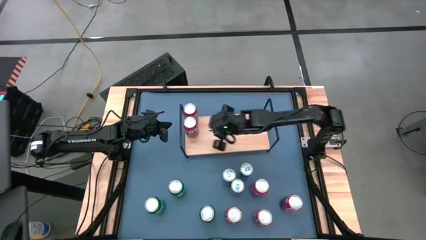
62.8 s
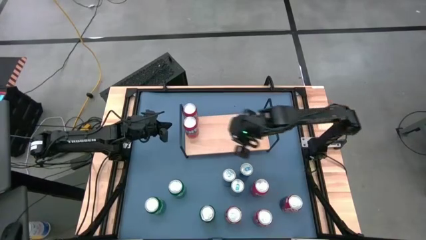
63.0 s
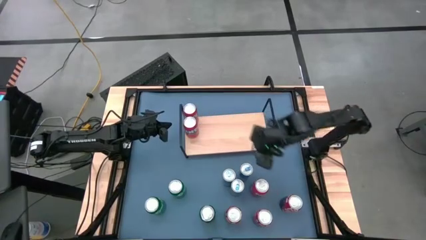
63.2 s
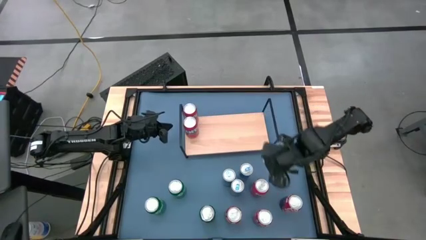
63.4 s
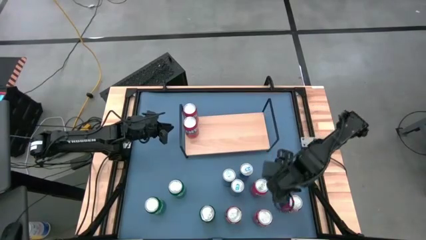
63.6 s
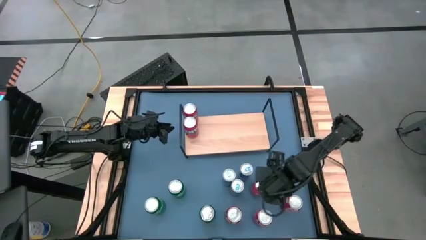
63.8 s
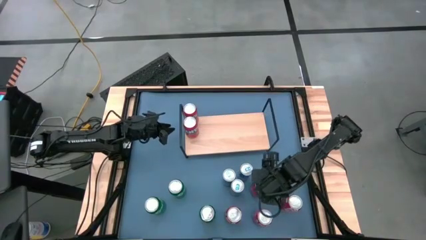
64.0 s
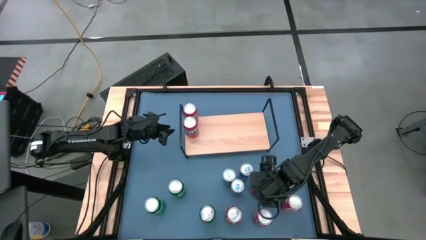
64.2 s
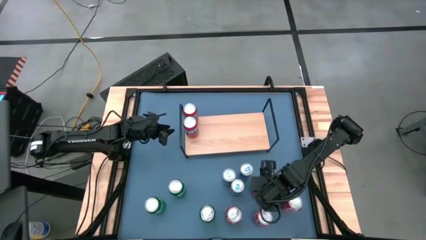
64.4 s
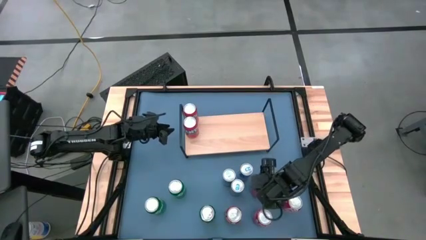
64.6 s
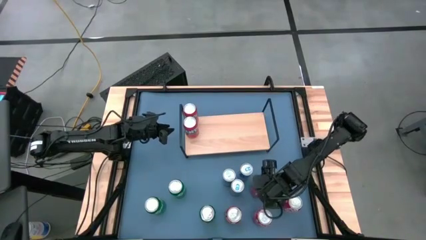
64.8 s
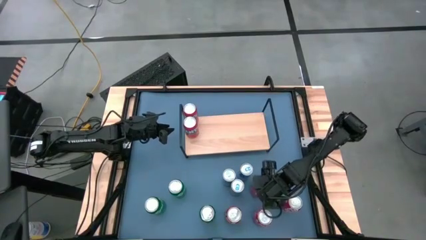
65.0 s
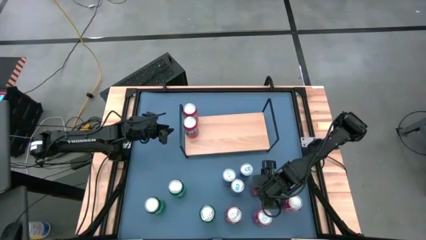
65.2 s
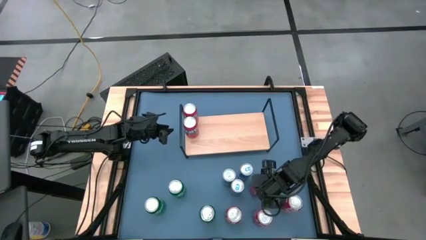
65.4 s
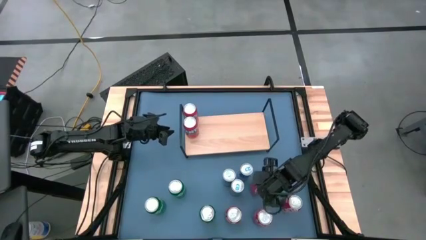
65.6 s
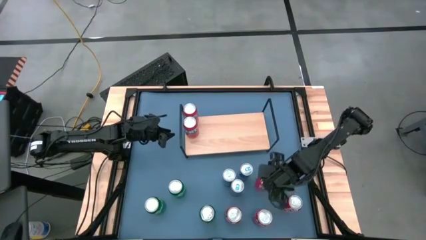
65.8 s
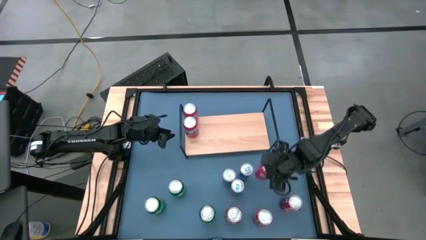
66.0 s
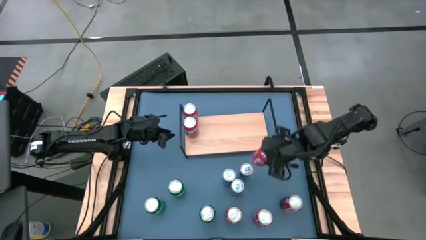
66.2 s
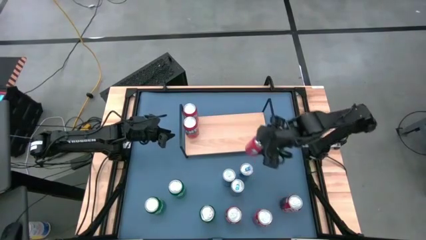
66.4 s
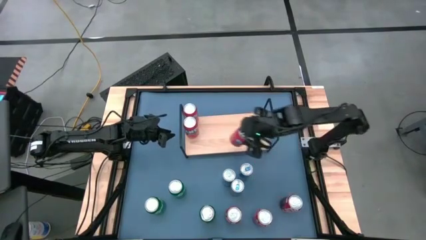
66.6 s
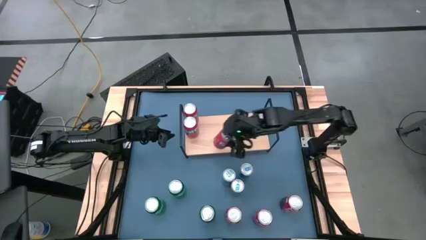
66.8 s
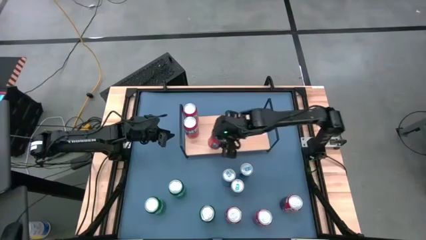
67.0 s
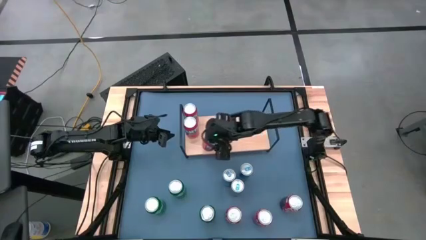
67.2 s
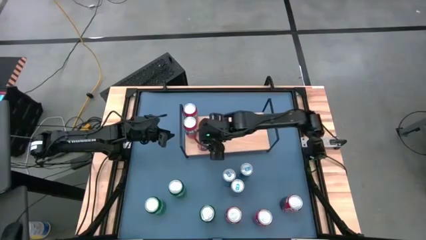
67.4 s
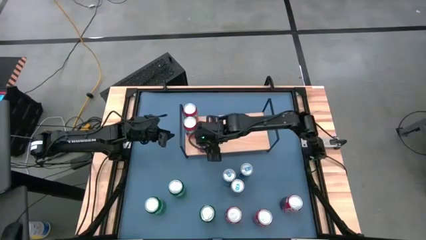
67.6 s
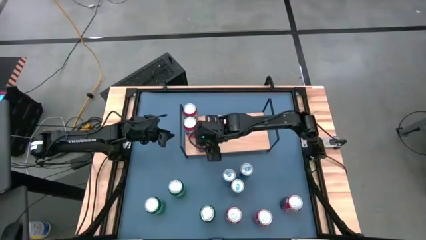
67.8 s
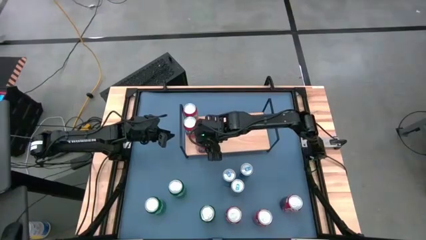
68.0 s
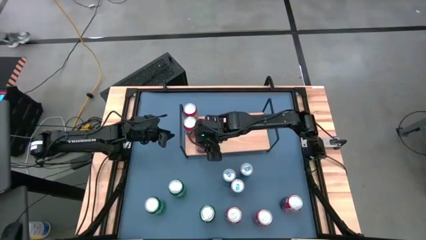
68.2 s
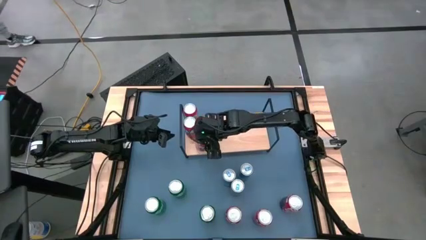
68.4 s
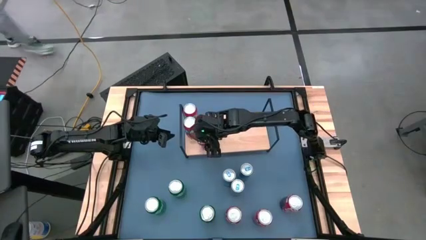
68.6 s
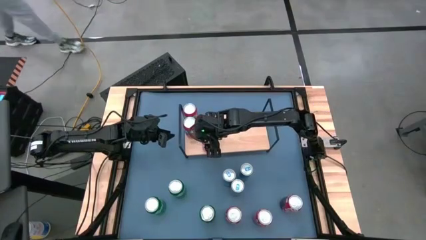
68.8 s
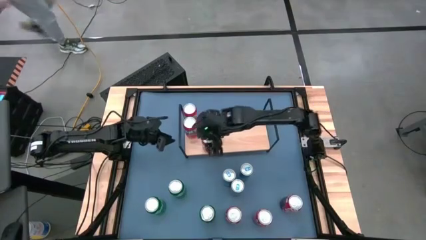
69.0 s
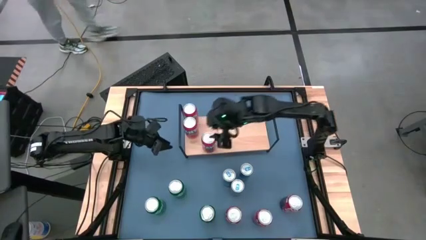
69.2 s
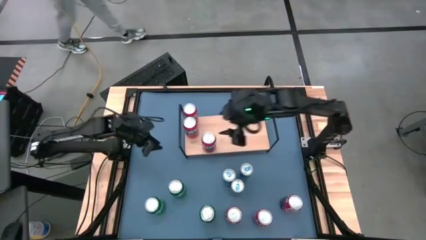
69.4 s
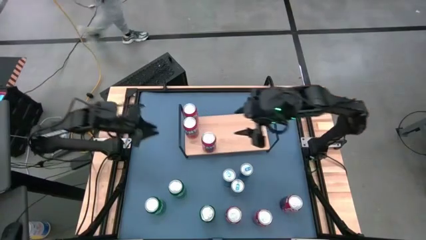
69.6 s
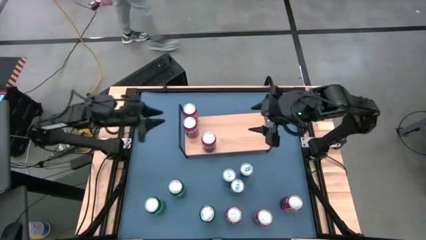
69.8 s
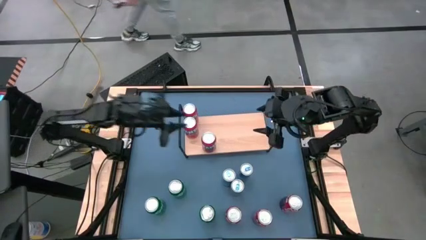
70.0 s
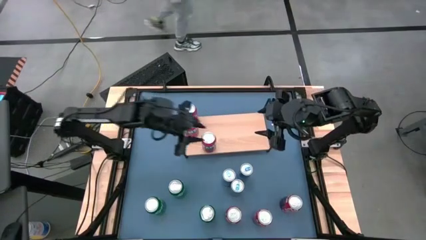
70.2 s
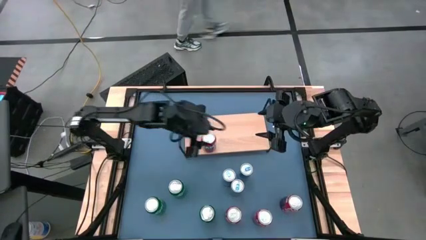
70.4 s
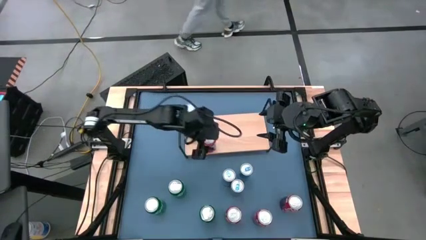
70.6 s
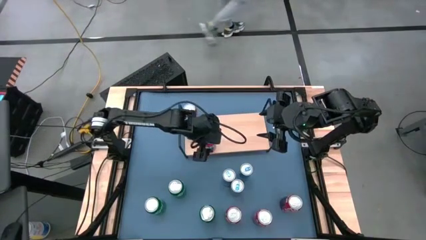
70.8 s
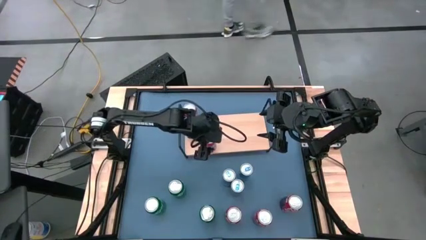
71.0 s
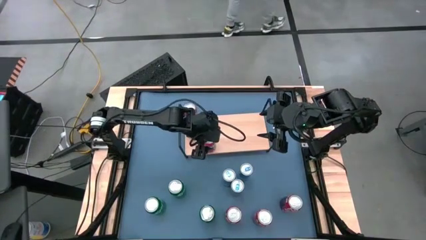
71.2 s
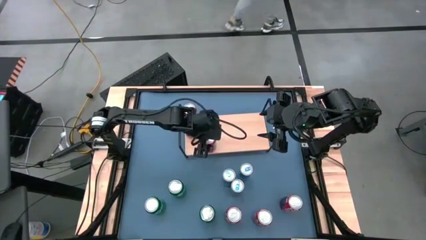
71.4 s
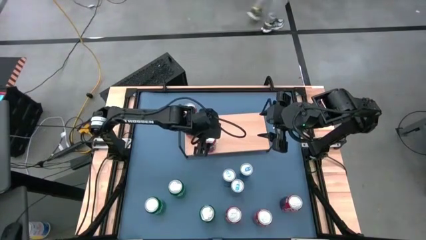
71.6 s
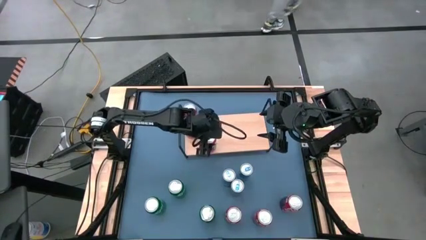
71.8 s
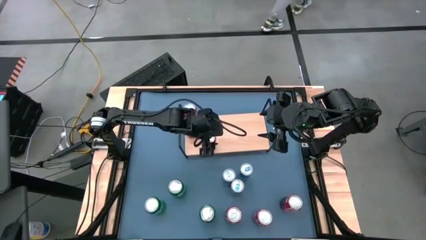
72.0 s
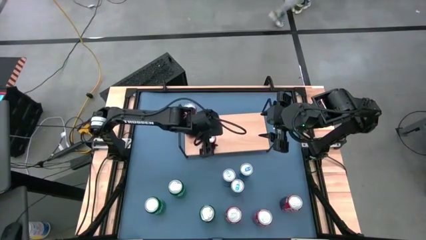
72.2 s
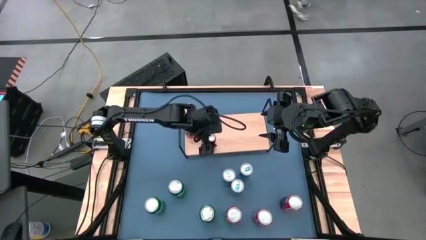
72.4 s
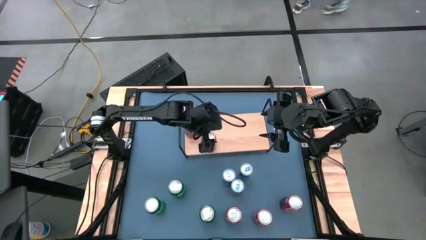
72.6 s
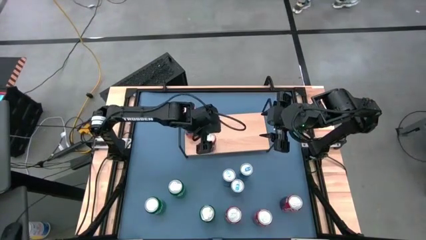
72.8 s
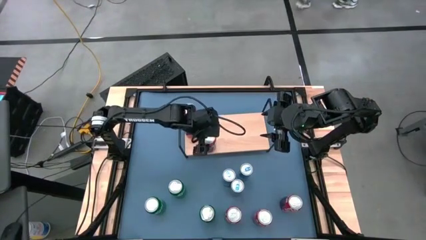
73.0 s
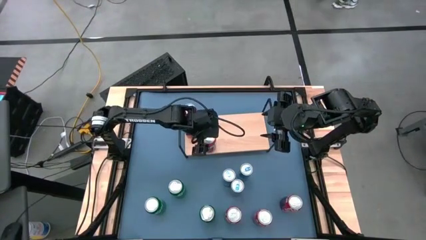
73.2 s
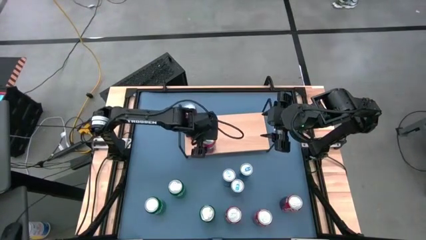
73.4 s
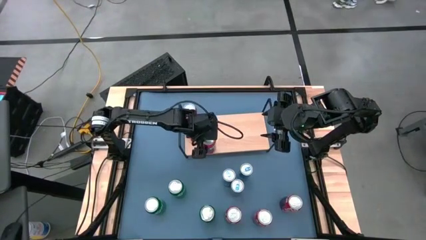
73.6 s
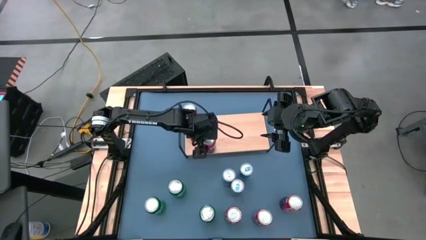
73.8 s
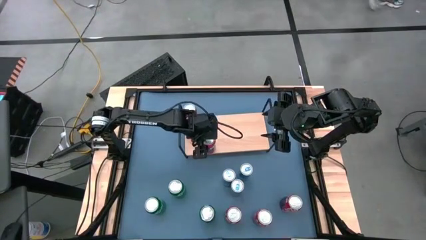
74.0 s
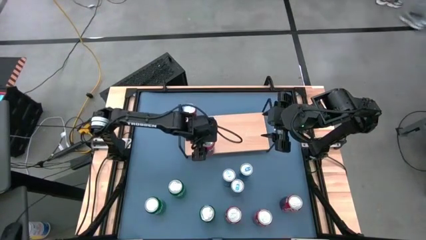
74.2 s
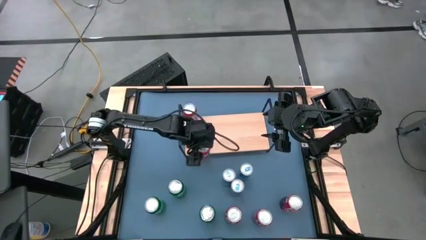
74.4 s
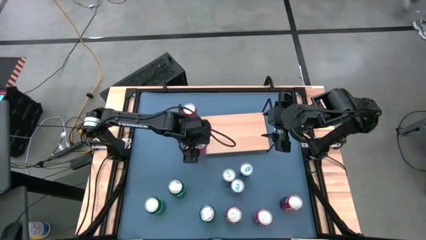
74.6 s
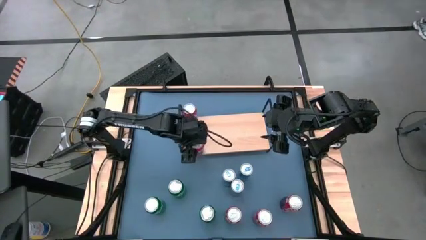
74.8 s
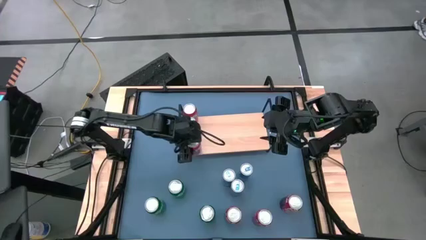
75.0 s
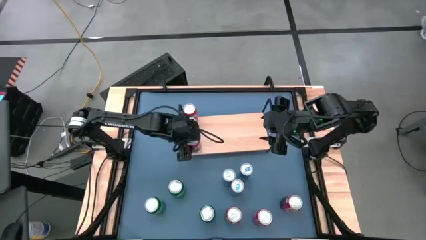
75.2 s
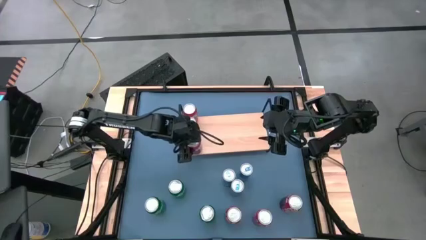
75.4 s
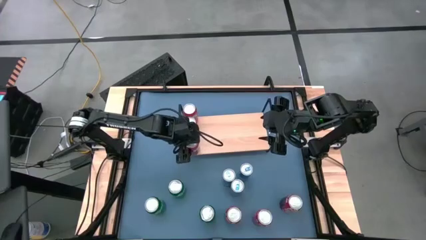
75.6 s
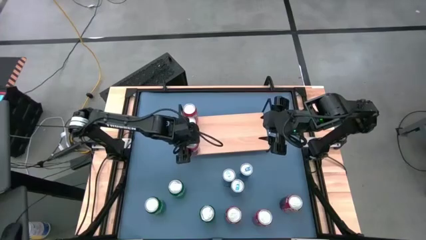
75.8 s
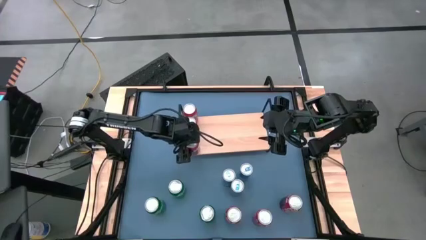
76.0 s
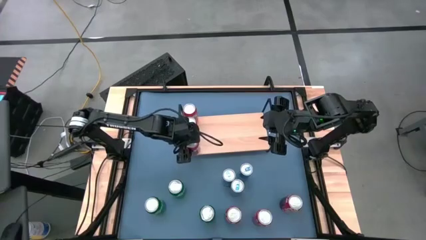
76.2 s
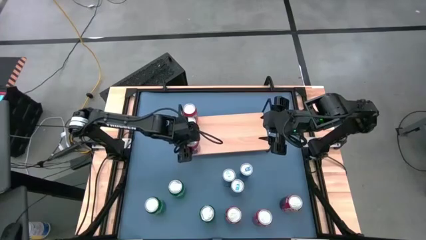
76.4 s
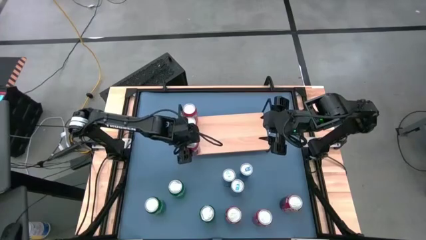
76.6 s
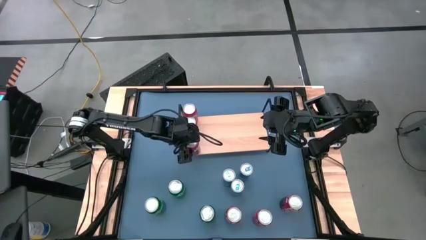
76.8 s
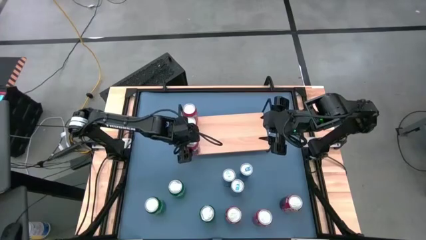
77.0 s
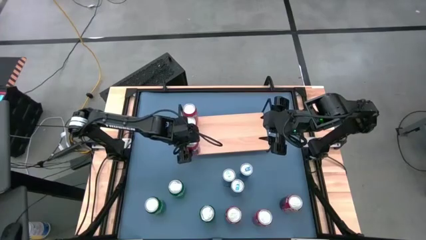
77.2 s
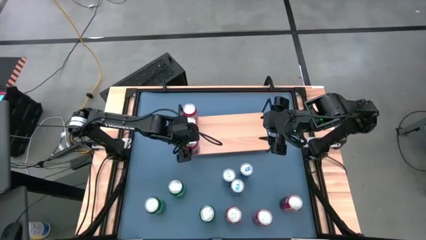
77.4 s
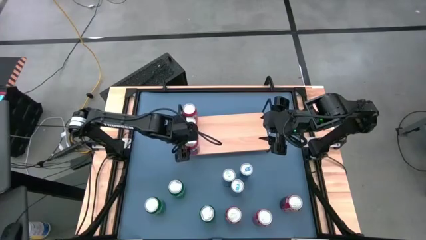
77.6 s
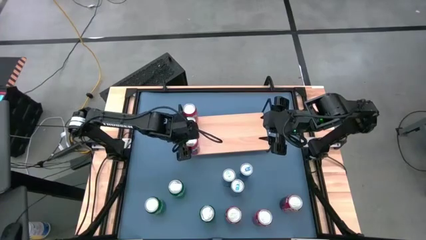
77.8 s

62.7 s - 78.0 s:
Task: Place canned beverage on shelf
Put the orange soda can on the shelf aligned with other orange soda cans
